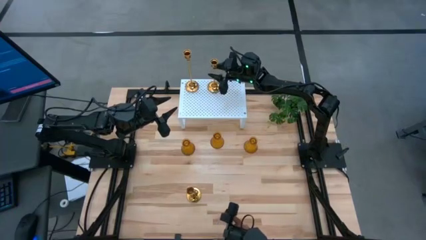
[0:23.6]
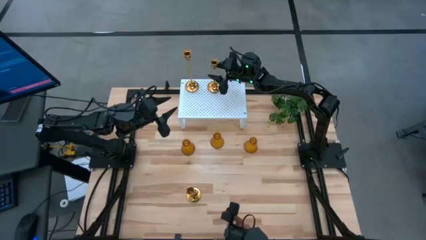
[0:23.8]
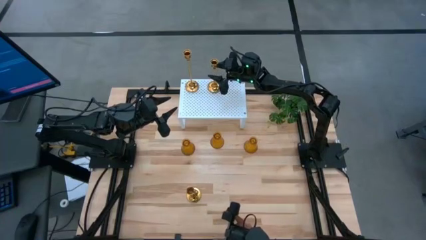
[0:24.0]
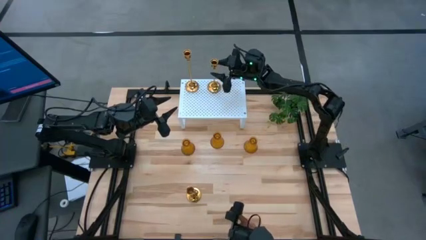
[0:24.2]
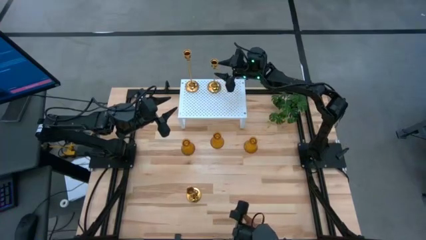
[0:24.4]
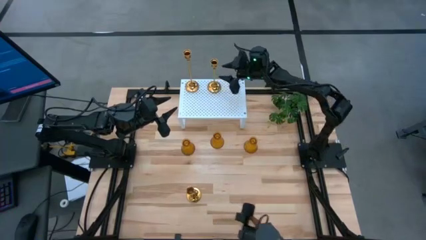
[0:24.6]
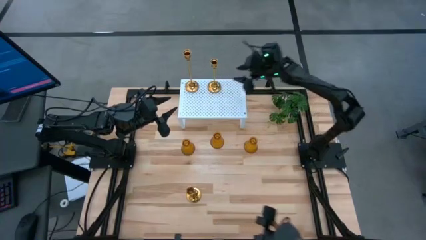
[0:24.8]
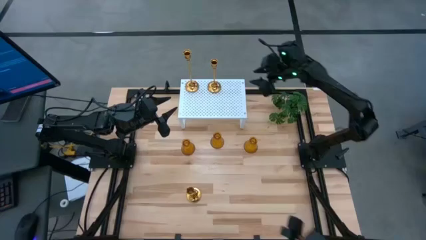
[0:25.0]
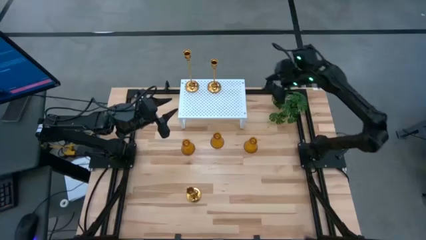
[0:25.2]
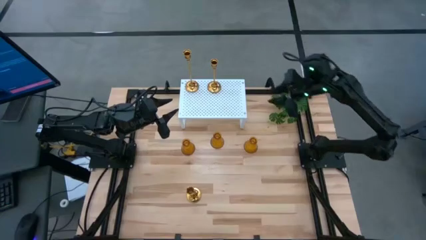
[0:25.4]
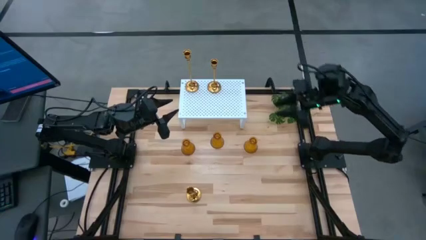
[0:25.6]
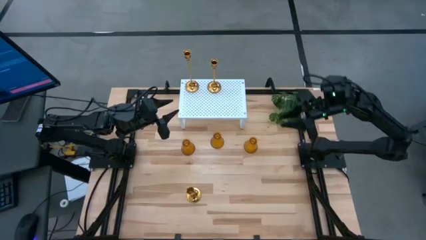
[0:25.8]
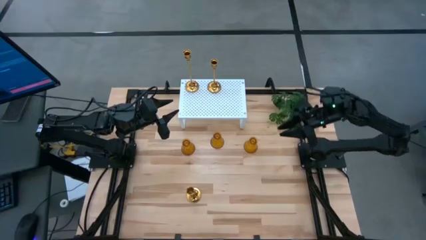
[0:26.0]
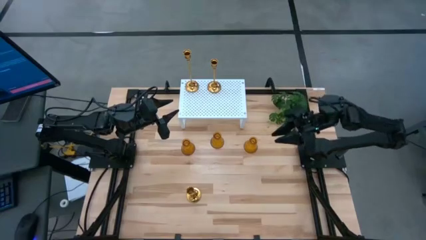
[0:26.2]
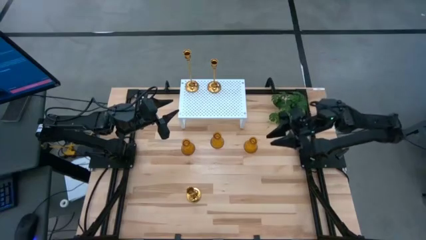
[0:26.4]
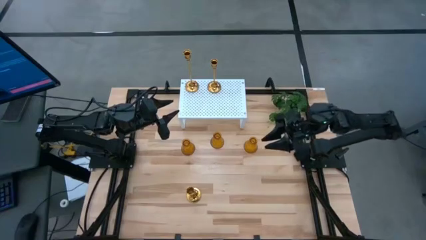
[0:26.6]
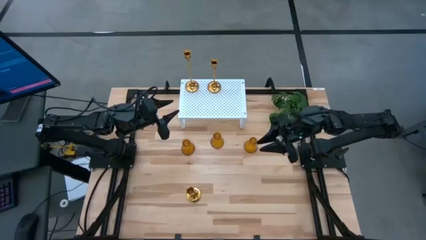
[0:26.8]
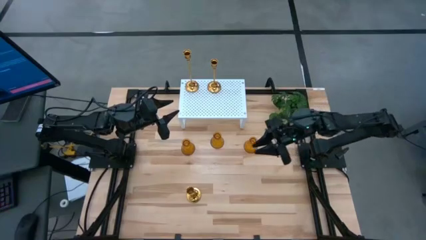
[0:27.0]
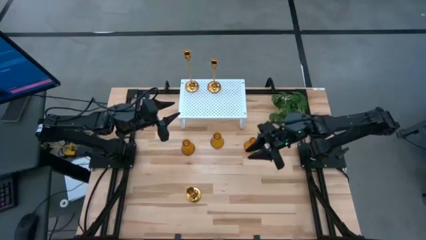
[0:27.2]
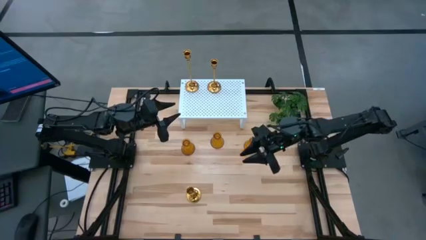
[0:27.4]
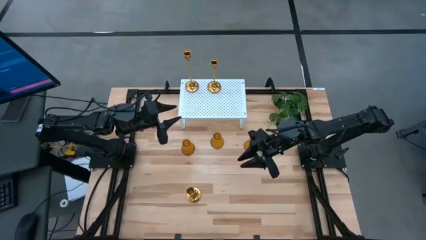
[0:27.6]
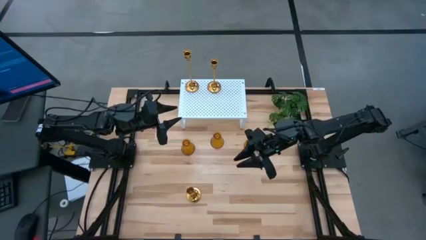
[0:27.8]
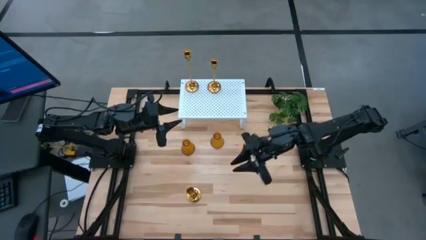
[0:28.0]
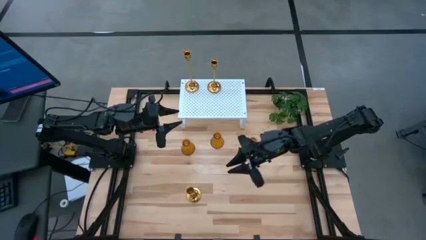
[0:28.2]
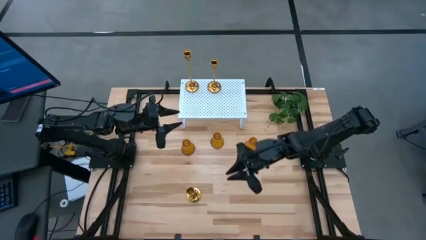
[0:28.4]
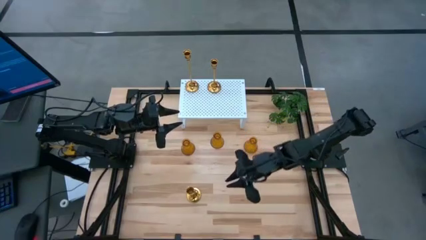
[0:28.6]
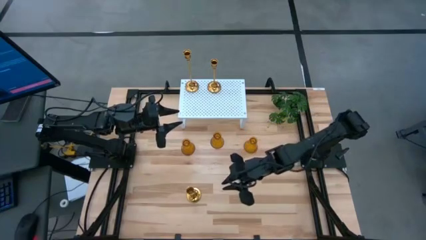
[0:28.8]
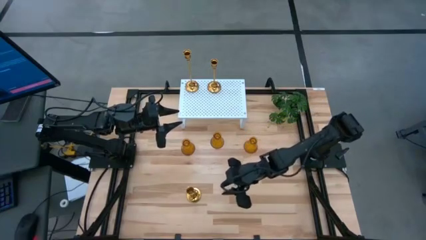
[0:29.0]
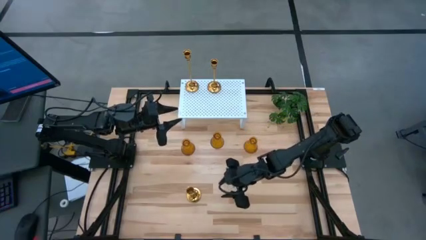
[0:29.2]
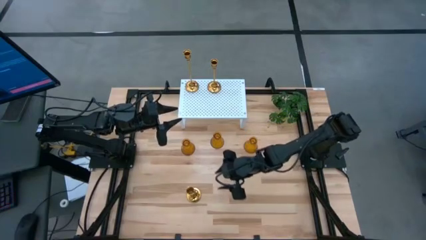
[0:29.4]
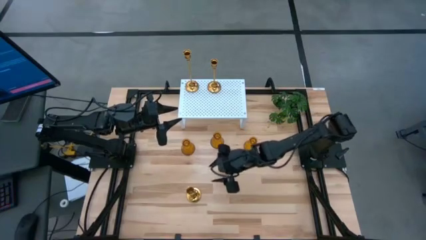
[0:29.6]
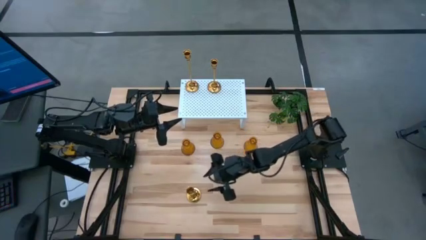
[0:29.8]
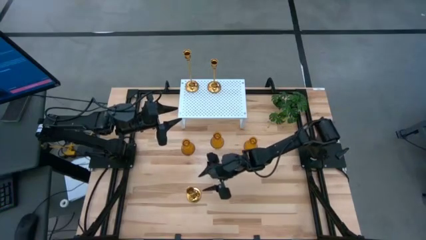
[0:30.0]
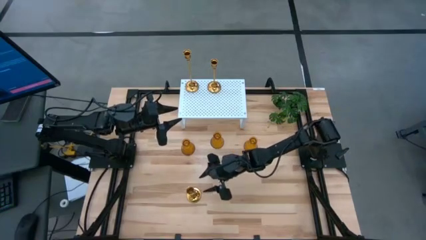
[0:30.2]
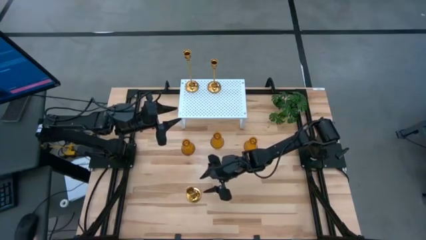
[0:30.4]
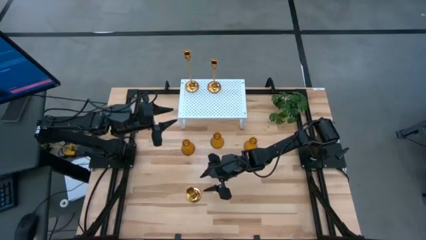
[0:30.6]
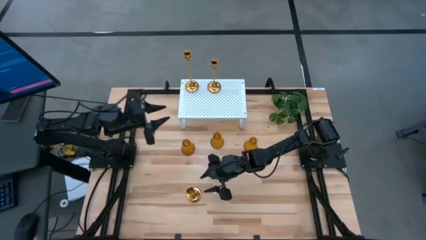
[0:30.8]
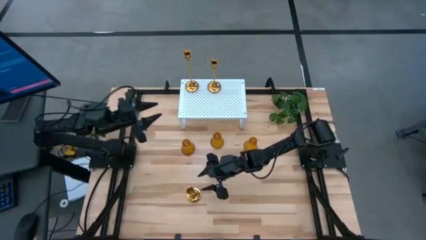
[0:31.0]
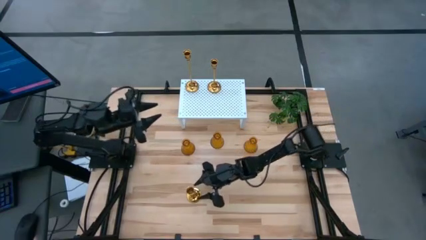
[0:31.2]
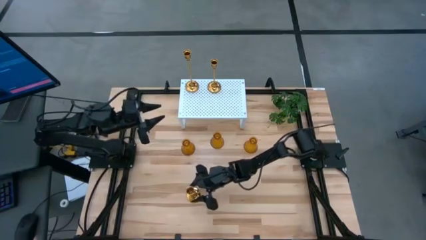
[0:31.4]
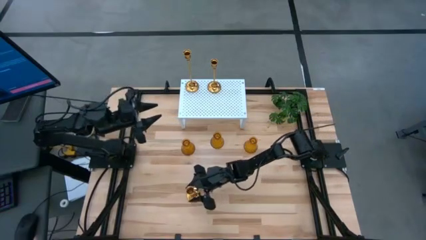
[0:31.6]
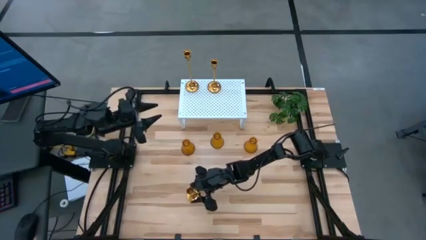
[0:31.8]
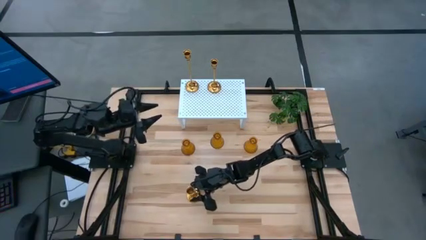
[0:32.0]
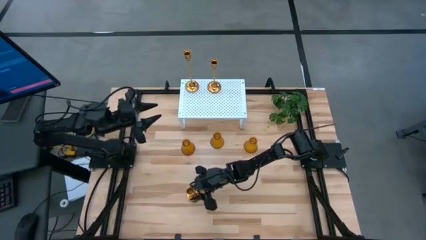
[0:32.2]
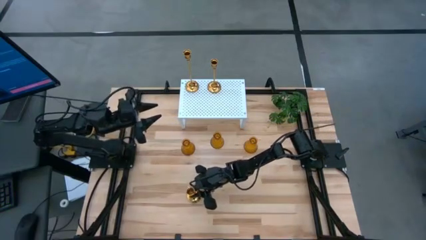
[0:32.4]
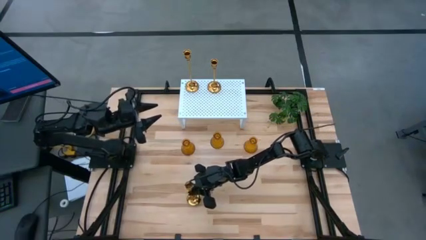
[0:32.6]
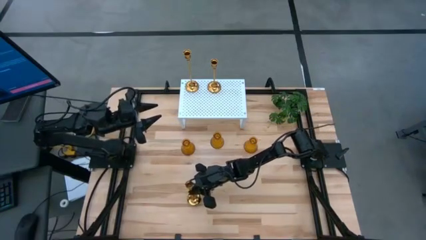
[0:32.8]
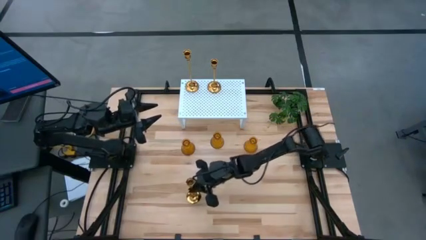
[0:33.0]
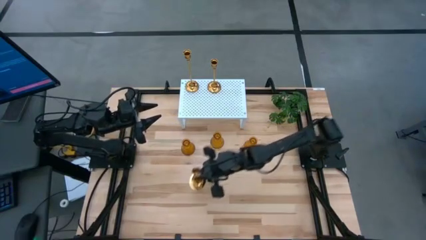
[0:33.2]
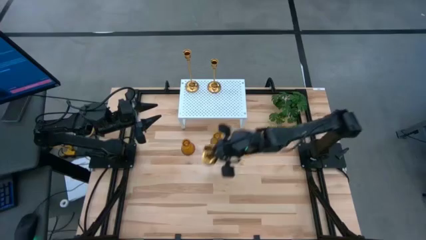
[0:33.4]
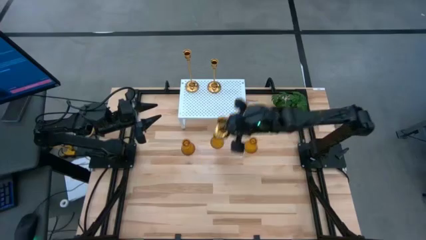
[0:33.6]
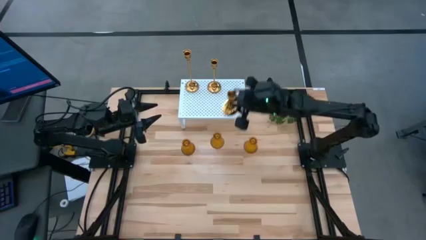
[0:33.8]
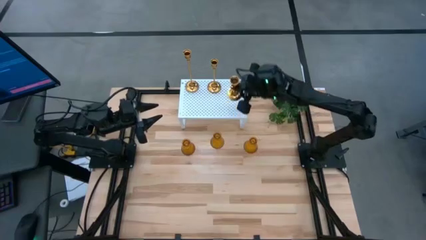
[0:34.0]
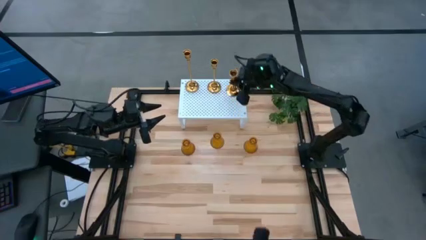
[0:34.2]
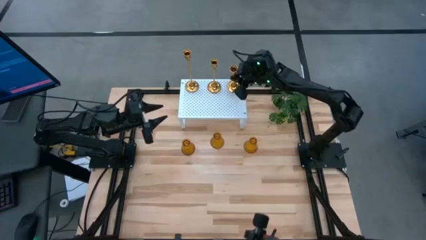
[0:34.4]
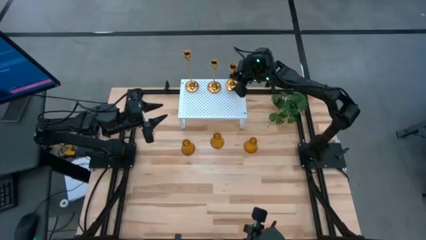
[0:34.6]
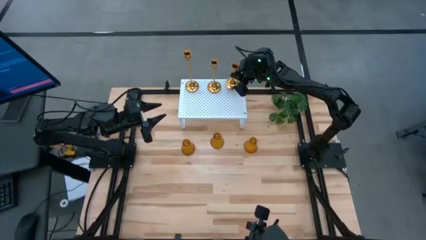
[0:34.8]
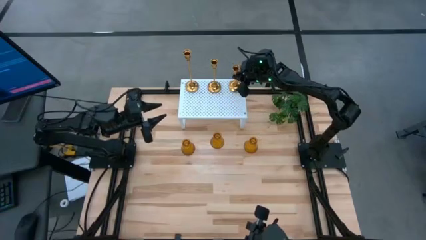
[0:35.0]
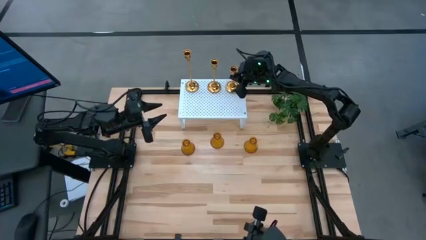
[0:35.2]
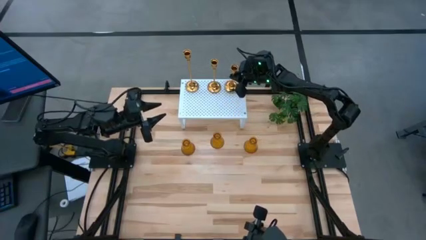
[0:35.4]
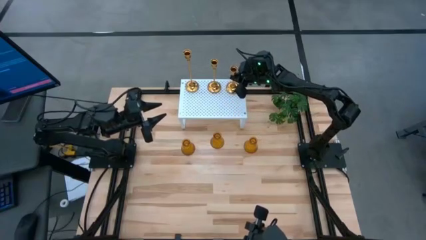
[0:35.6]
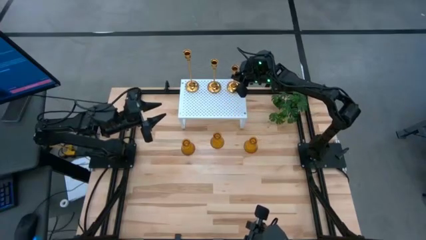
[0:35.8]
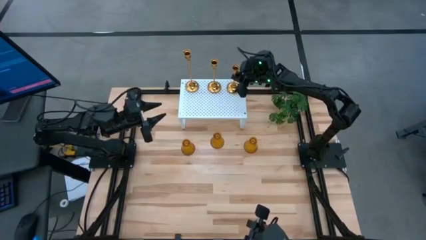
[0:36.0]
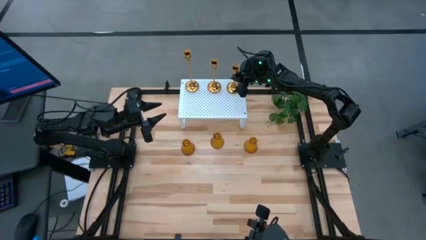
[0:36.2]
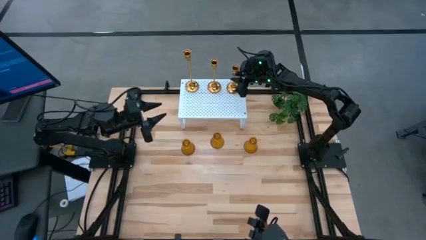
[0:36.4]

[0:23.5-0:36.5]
Task: Pick & Place candle stick holders
Put the gold candle holder on the shelf aligned with the other gold candle holder

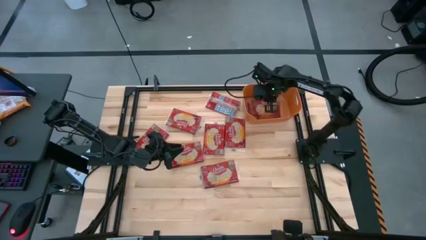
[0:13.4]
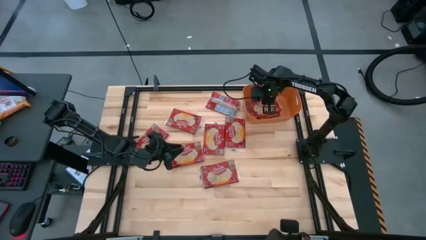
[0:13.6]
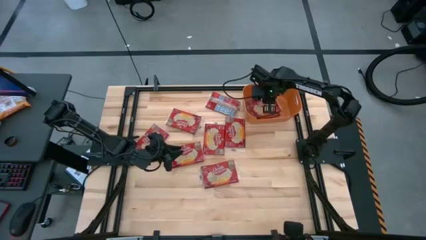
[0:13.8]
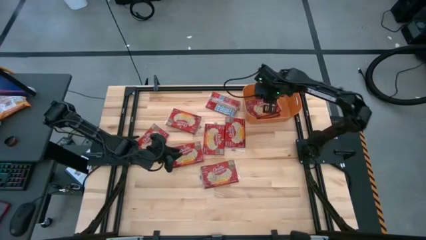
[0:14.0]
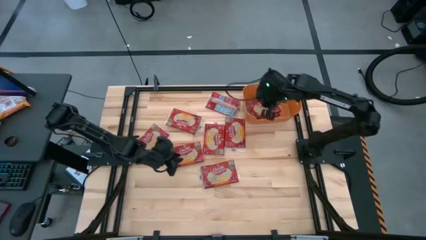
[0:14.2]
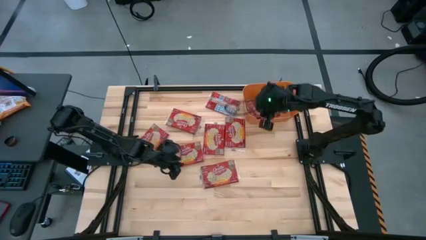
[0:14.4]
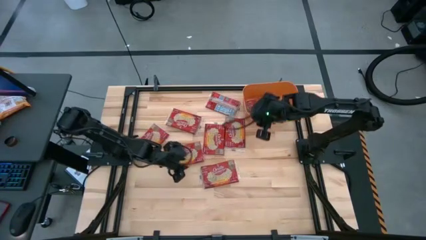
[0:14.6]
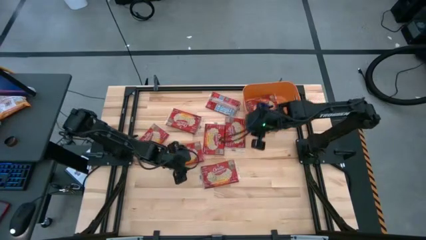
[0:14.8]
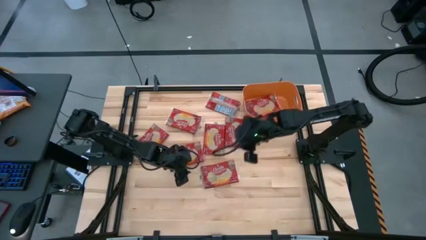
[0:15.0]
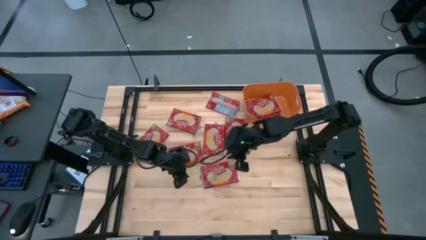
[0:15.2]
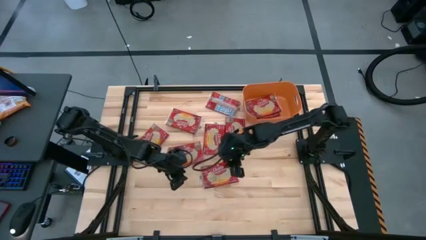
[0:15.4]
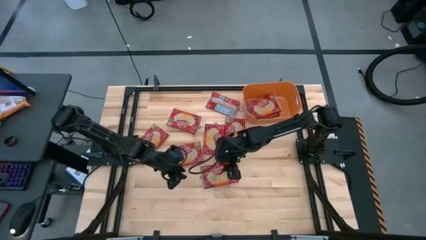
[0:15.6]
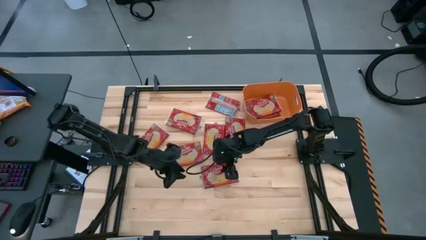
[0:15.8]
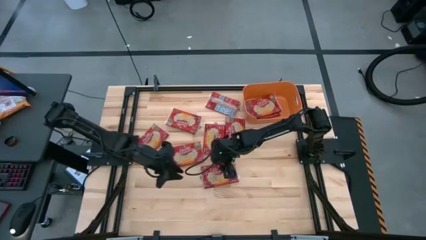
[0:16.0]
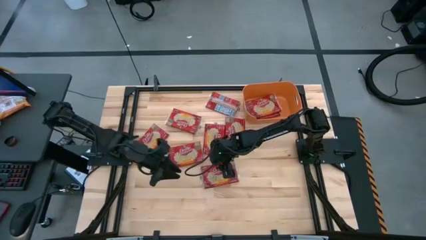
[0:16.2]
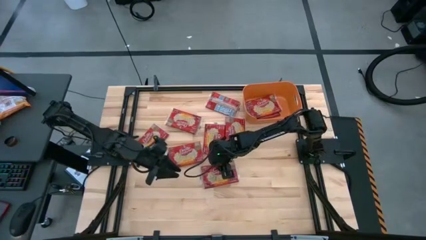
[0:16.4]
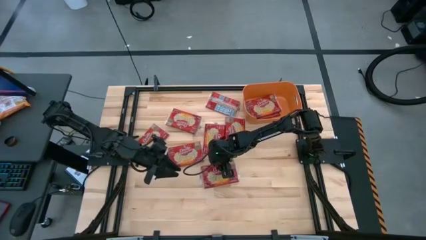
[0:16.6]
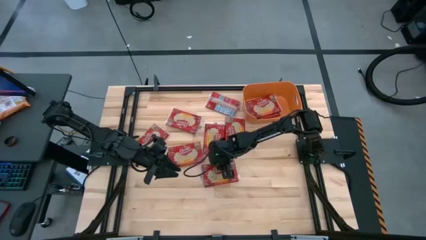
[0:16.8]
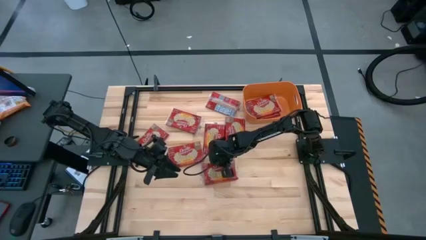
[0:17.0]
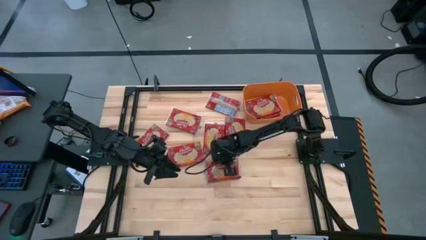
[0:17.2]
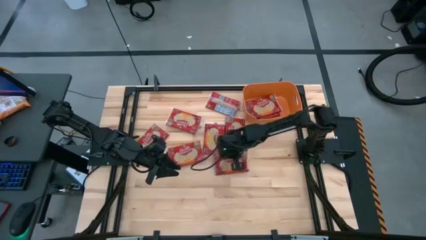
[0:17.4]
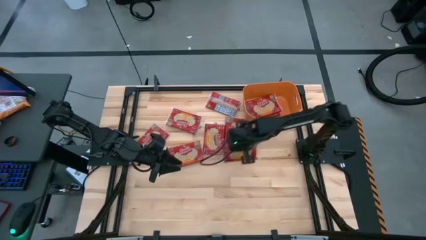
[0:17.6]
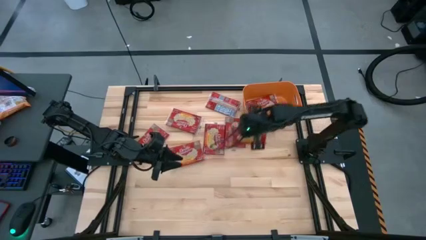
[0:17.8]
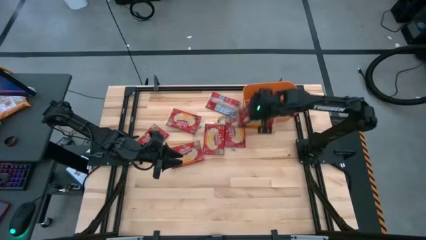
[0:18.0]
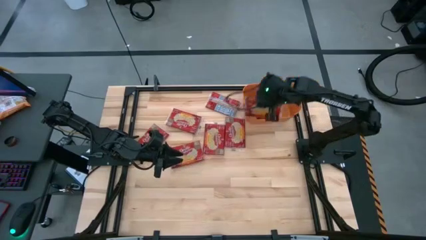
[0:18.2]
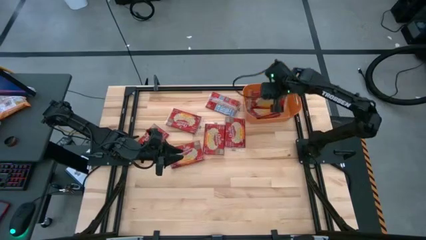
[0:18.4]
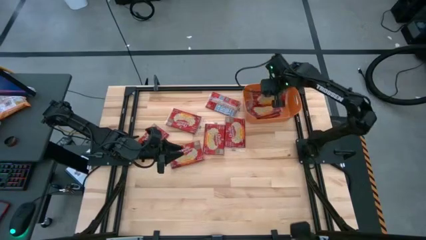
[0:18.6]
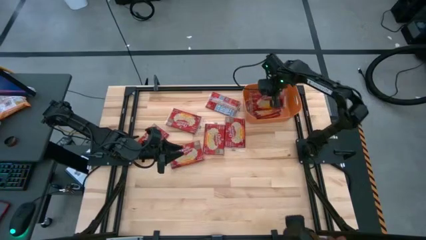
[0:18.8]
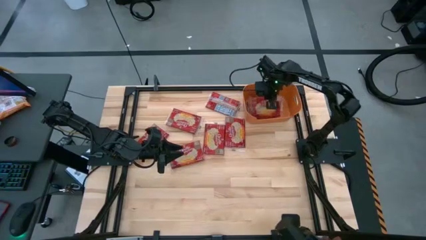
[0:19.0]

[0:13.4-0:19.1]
Task: Sort popcorn bags into baskets
Put the red popcorn bag into the orange bin
